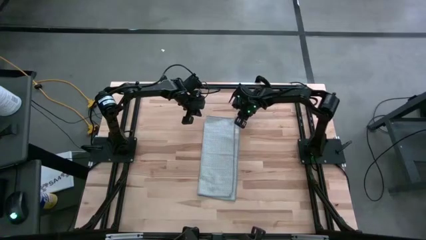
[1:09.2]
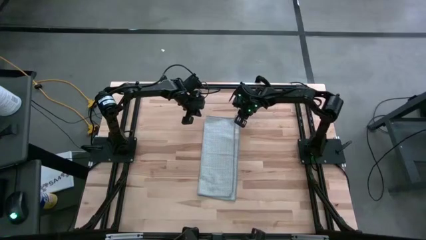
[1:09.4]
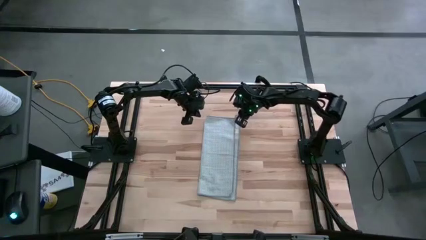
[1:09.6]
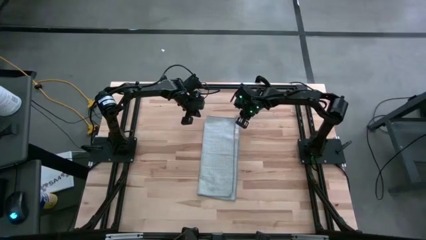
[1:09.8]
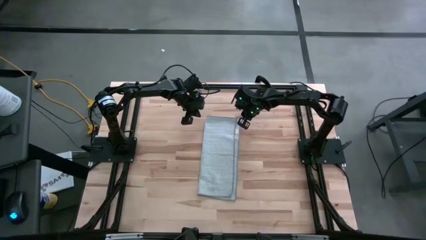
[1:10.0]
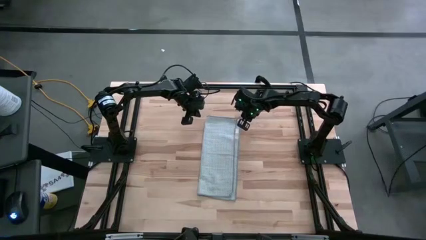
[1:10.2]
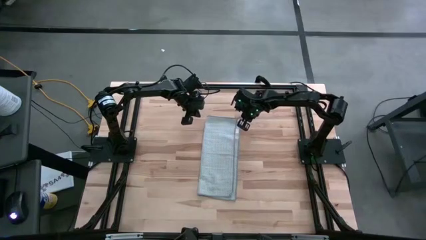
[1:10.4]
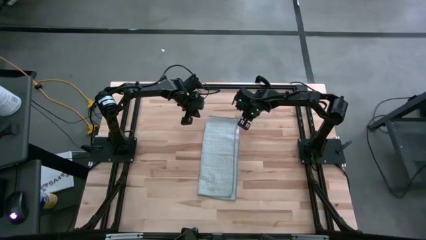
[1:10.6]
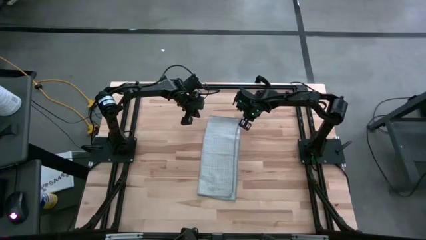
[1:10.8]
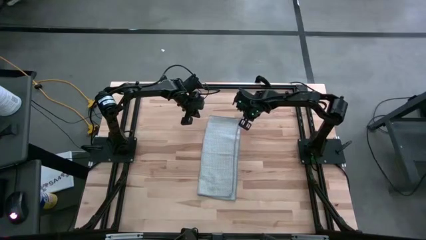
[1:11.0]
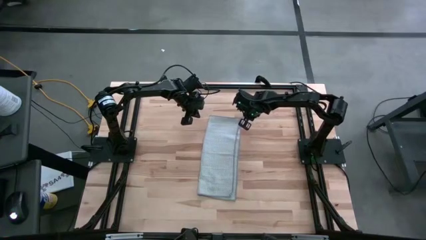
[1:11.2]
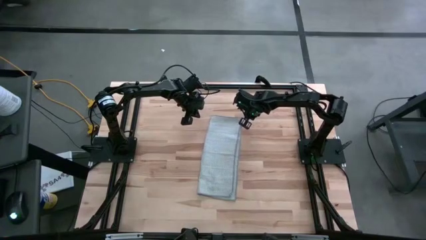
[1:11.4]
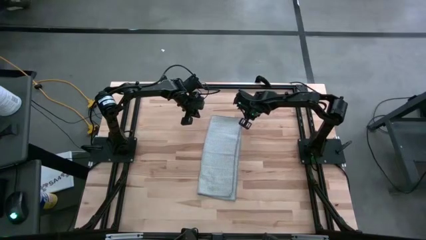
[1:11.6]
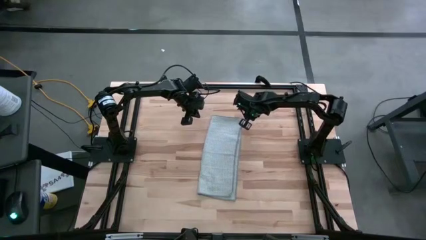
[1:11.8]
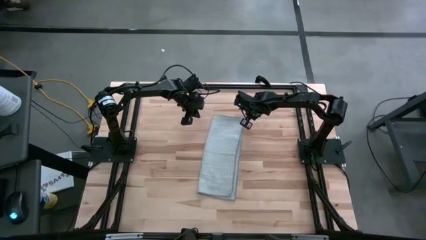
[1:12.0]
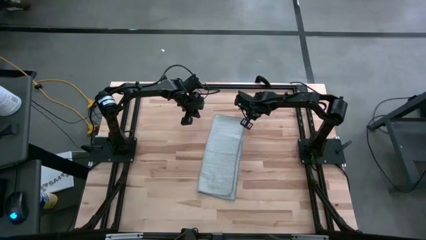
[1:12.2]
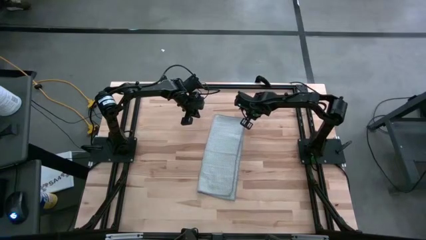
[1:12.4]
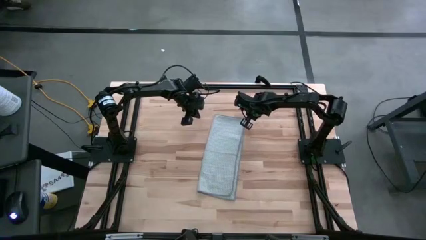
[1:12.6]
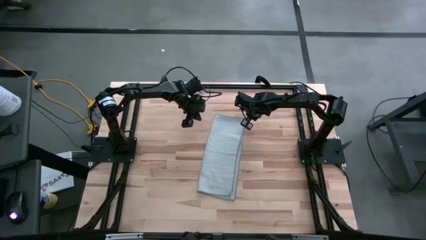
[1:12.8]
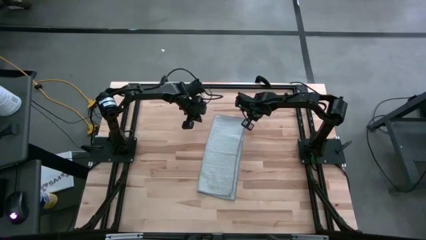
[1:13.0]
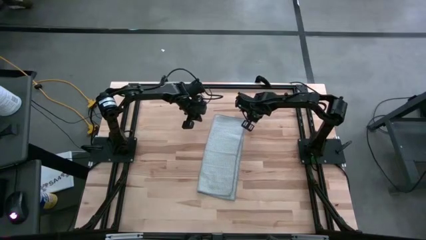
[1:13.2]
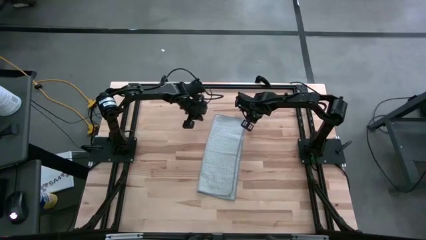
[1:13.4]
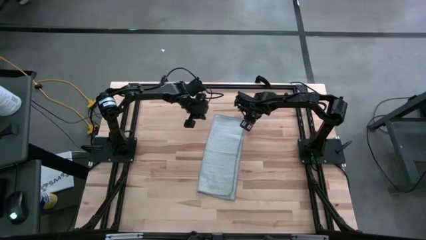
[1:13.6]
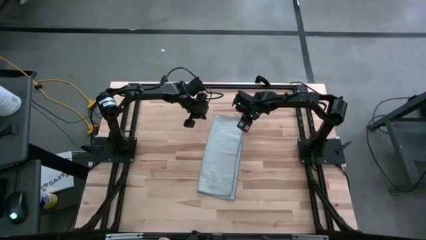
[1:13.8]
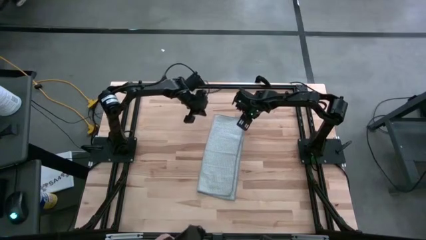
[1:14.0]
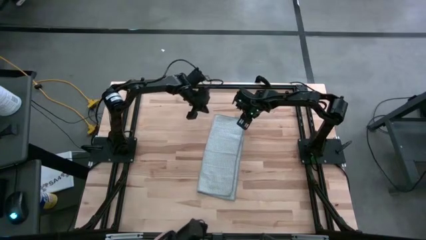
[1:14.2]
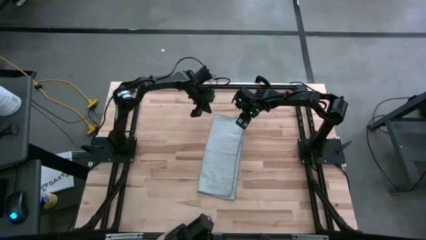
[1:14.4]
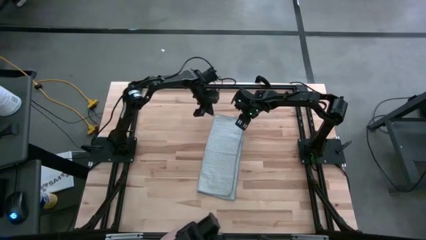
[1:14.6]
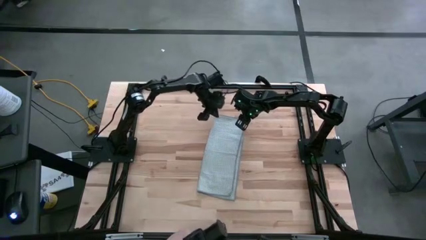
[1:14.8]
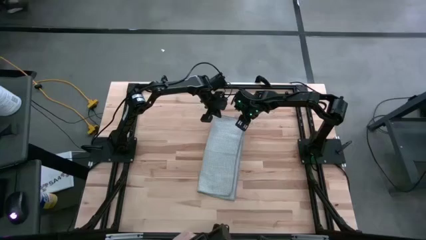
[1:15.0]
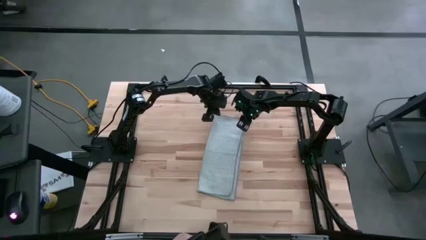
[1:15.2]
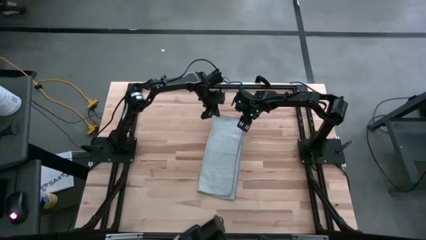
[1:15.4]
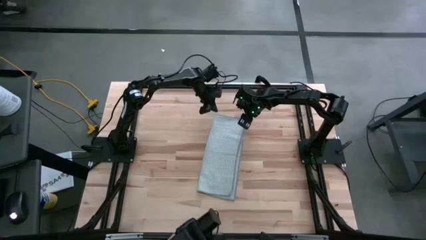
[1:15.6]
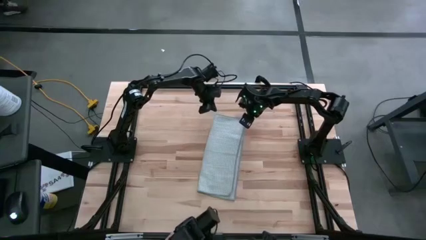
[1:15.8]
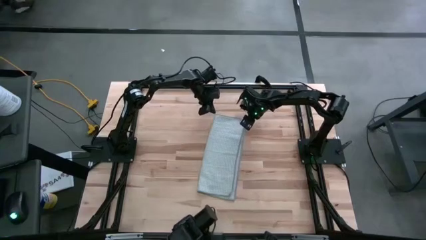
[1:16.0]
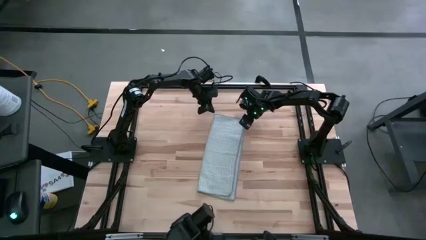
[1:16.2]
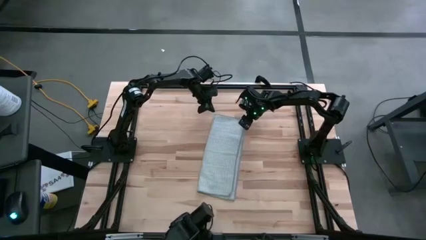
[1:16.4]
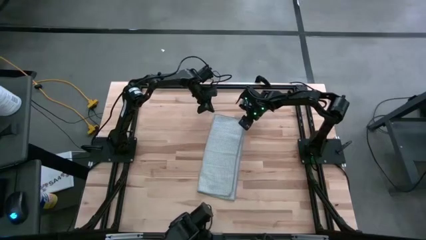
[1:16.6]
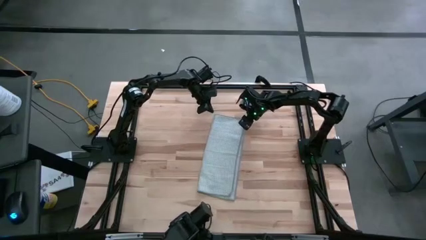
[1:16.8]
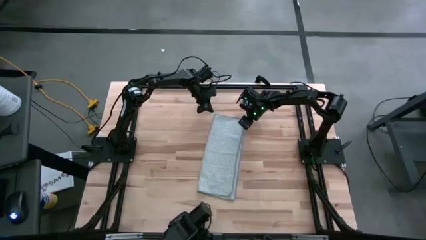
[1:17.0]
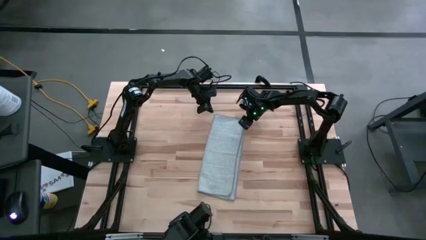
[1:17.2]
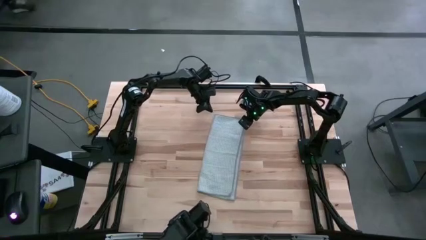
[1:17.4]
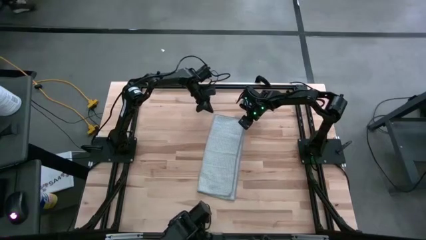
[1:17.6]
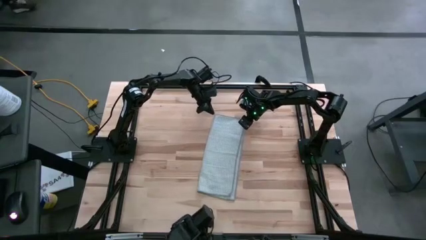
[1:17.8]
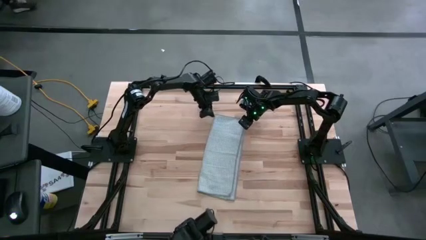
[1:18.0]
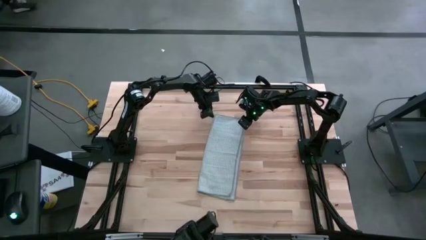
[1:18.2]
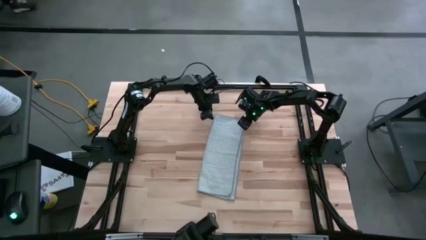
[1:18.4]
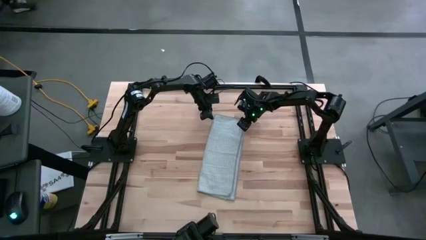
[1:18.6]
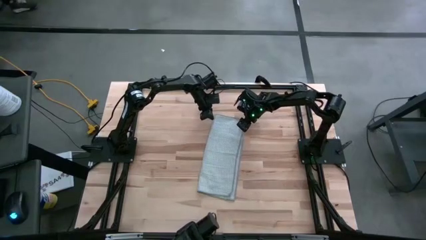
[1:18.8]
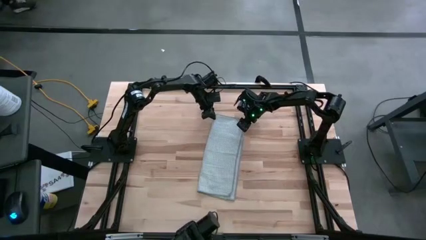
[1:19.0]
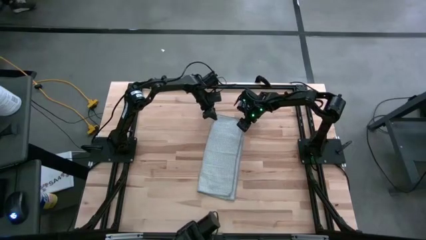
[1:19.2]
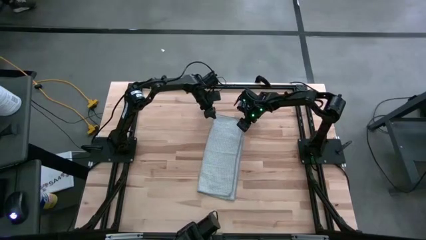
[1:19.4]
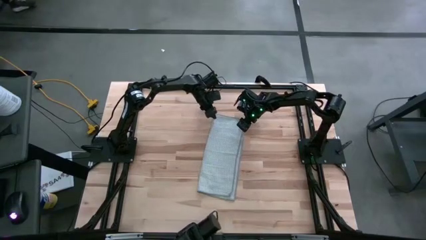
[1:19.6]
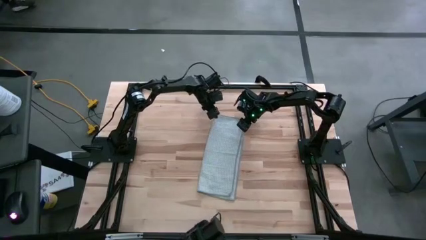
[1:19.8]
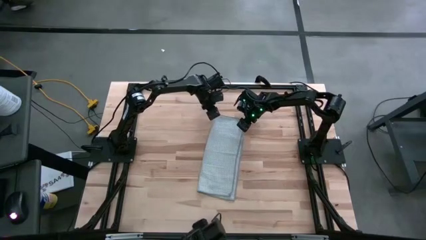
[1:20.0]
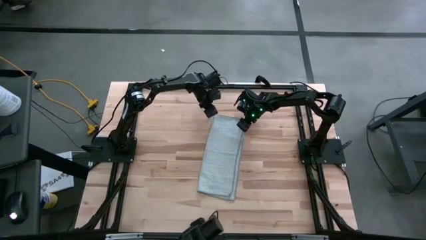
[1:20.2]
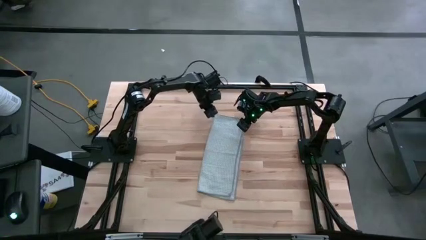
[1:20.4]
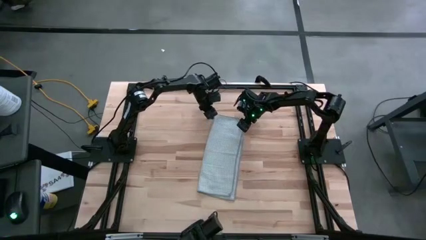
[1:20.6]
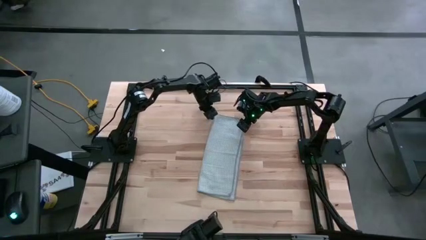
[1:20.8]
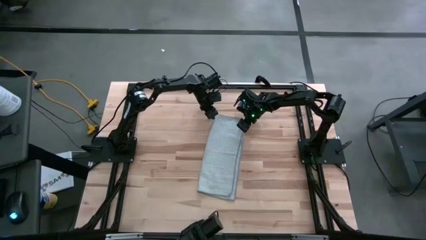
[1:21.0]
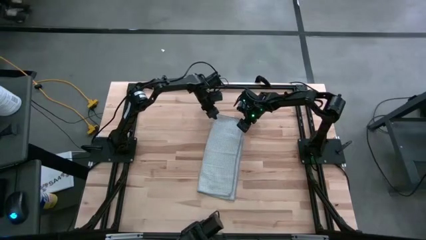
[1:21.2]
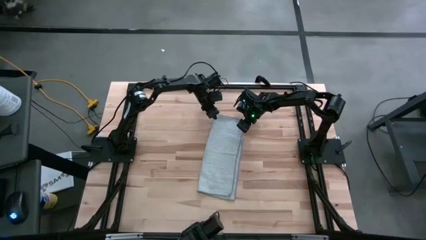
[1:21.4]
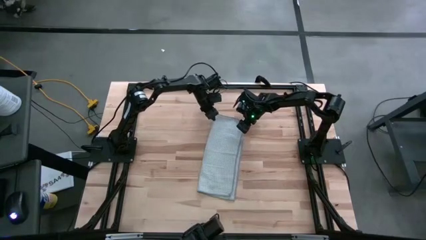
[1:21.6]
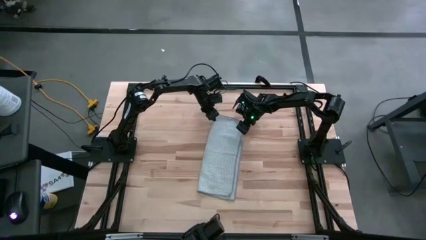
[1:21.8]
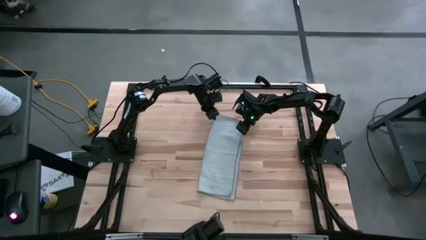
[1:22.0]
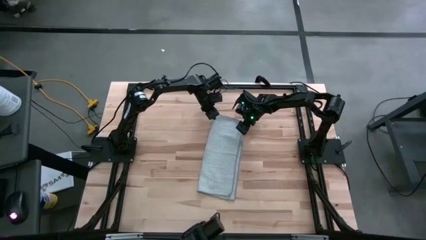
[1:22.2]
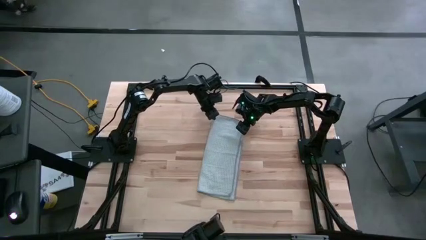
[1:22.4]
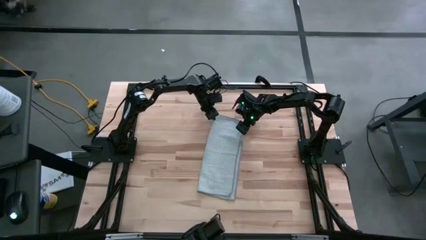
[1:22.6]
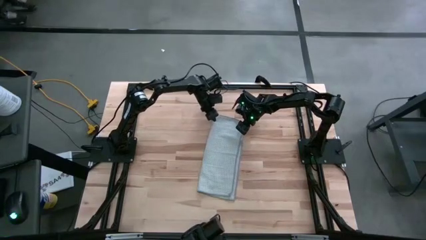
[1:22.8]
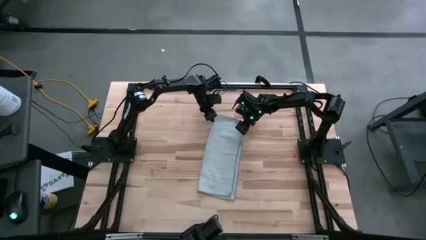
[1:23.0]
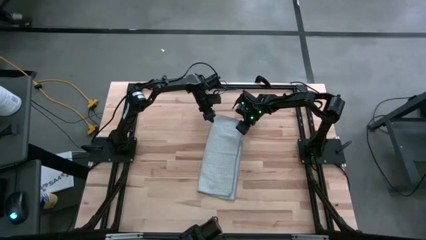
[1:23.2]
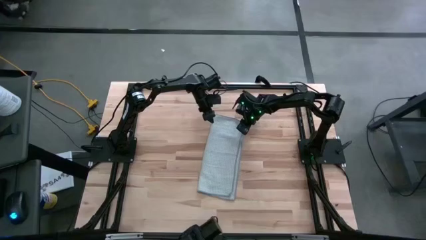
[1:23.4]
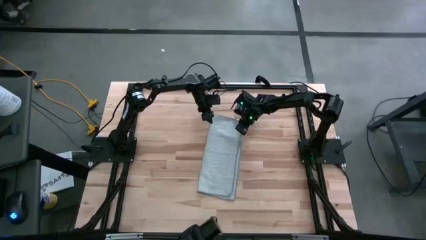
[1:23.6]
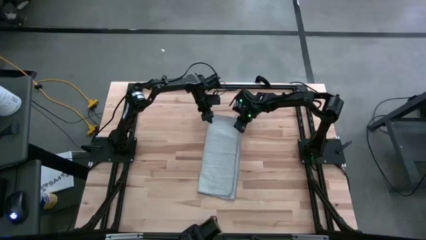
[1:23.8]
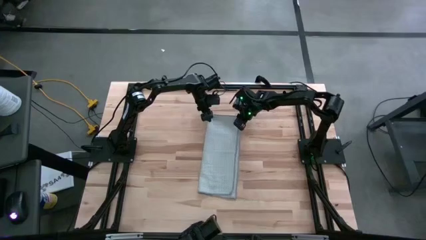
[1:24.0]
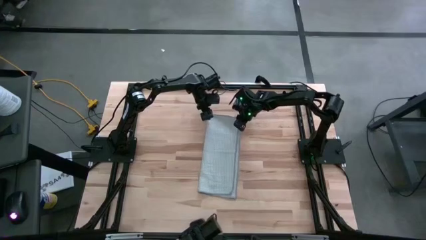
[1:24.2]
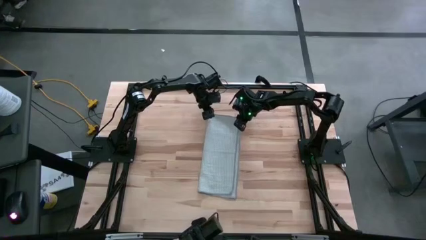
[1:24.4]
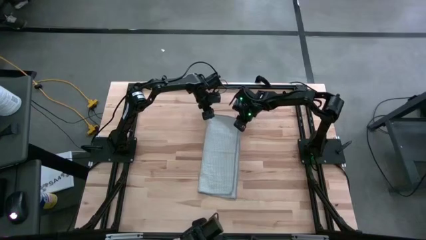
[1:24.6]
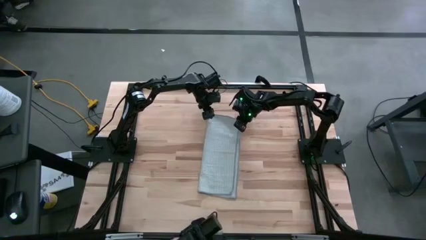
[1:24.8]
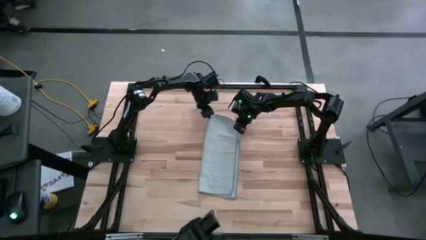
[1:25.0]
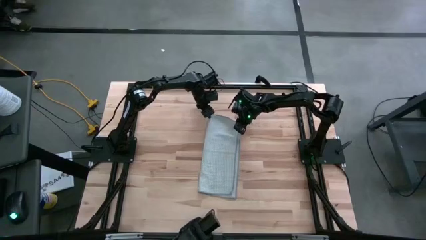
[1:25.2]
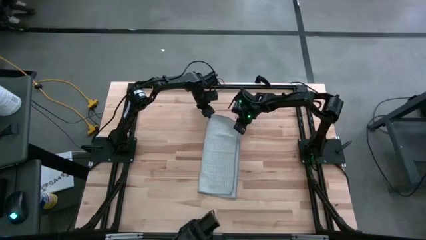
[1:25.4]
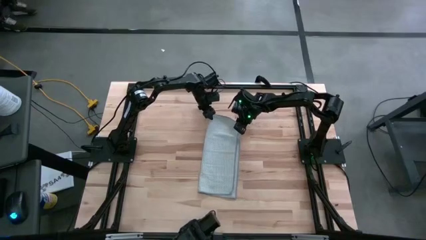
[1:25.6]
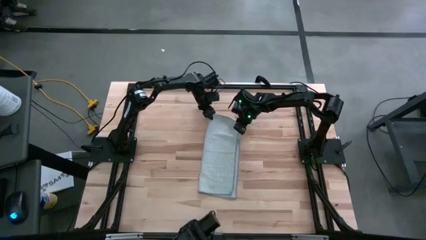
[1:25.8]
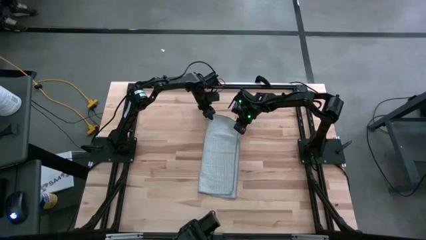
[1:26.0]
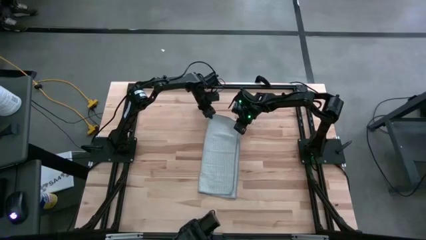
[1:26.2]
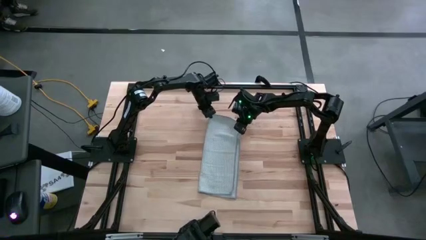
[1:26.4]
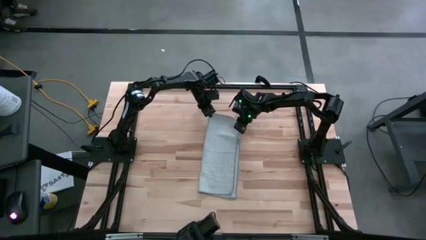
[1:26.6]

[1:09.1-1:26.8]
Task: Fold microfiber towels
Fold the gray microfiber towel
